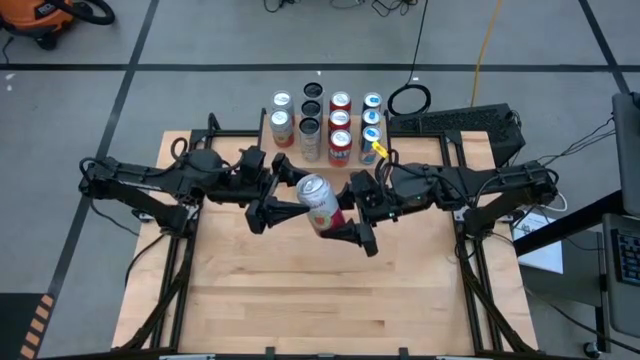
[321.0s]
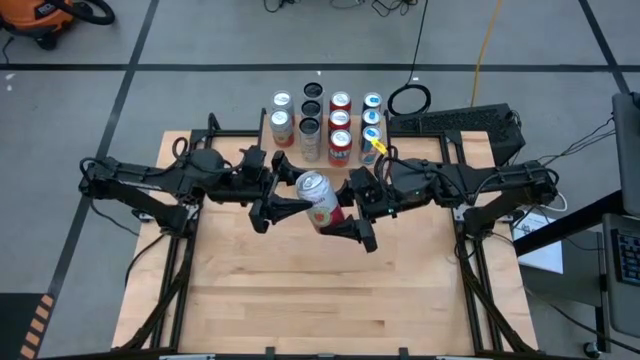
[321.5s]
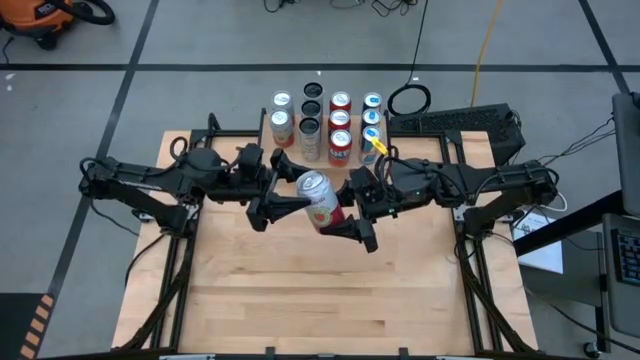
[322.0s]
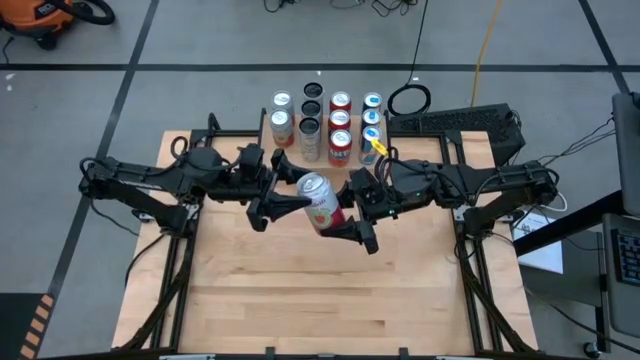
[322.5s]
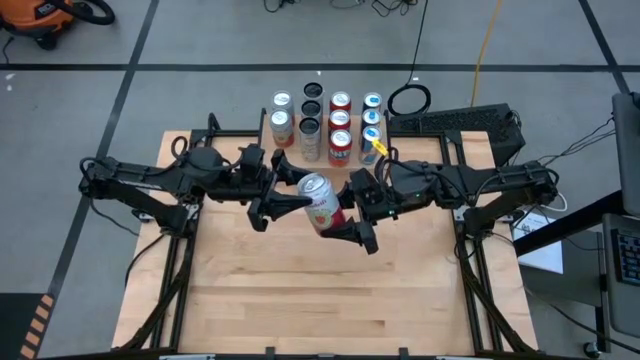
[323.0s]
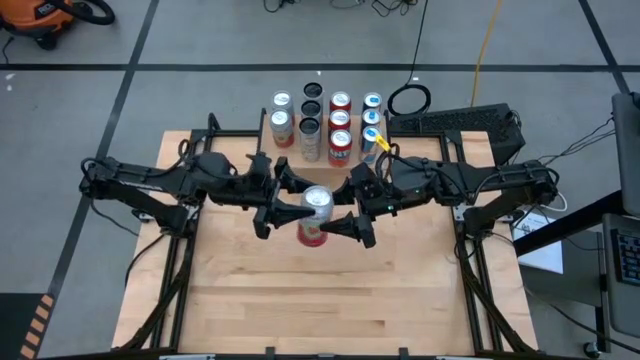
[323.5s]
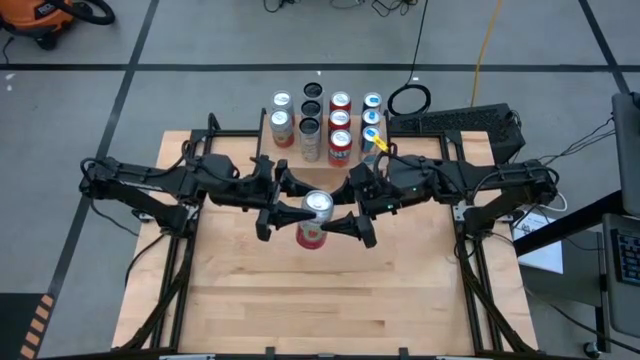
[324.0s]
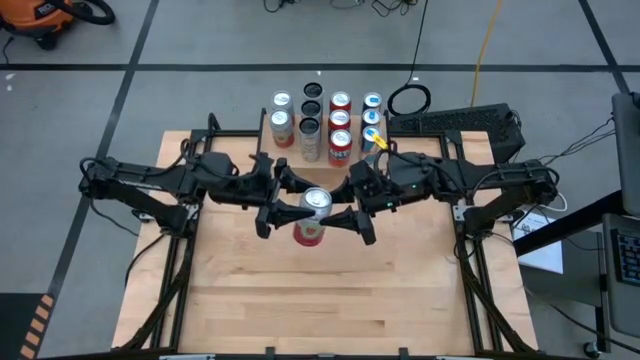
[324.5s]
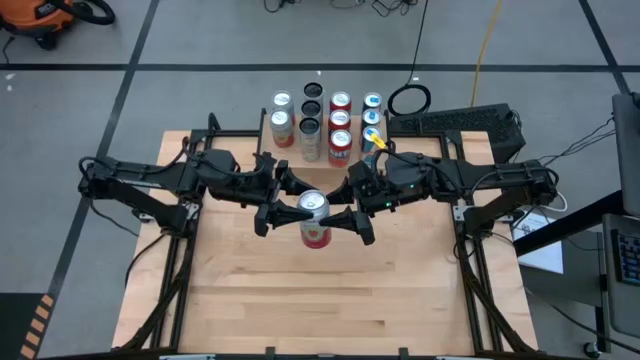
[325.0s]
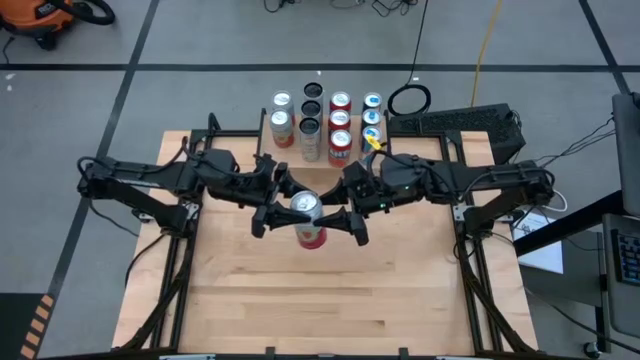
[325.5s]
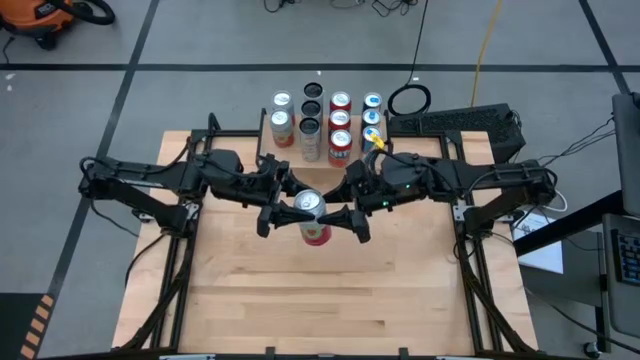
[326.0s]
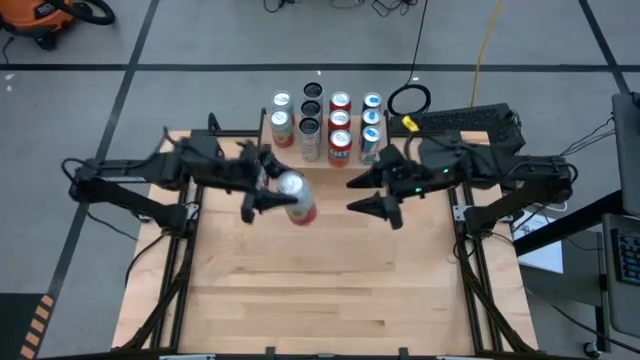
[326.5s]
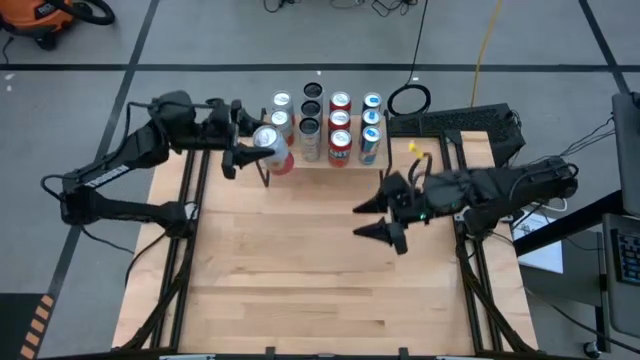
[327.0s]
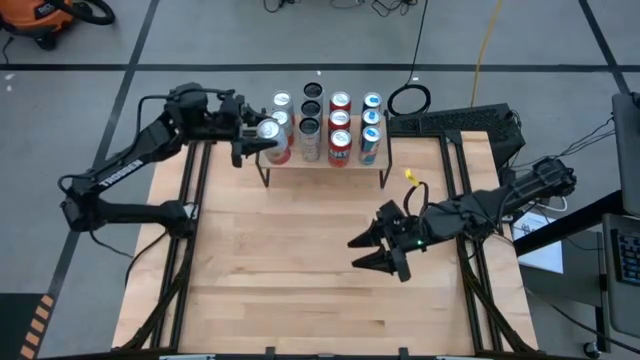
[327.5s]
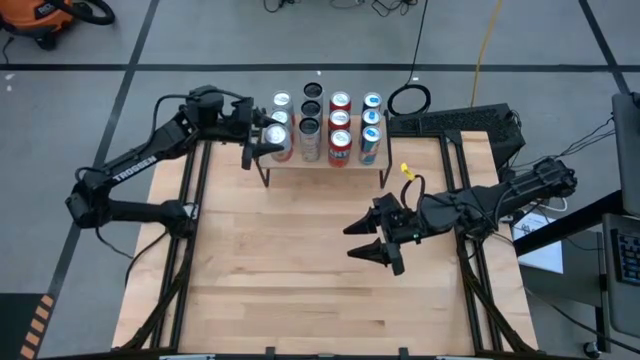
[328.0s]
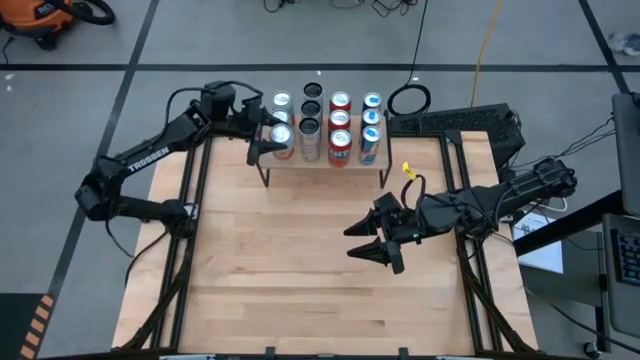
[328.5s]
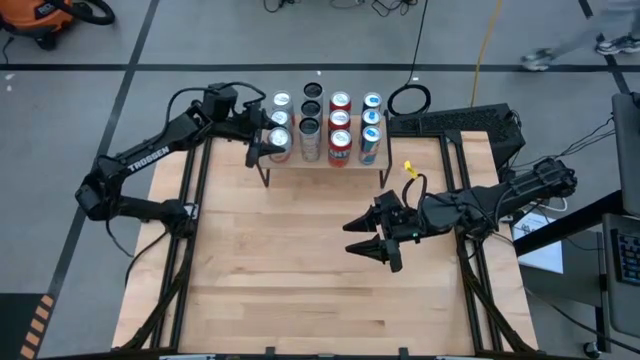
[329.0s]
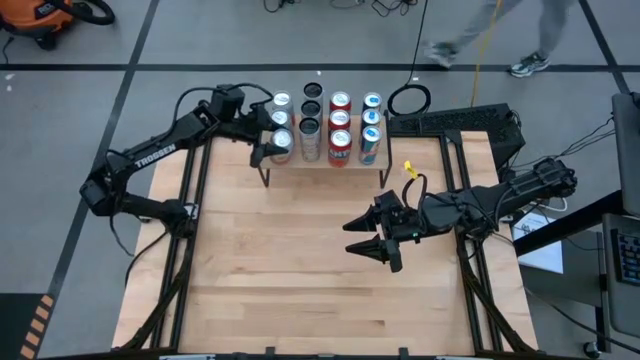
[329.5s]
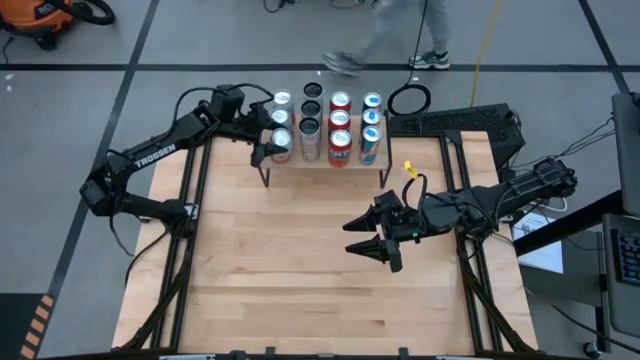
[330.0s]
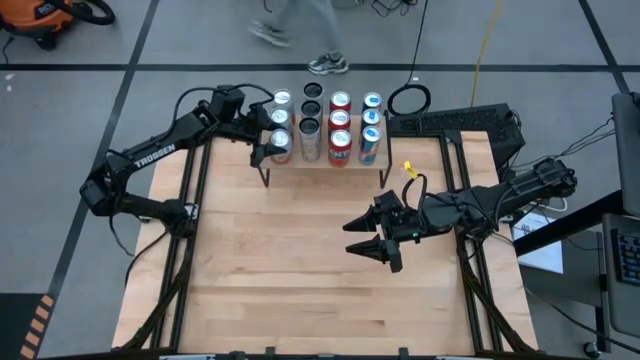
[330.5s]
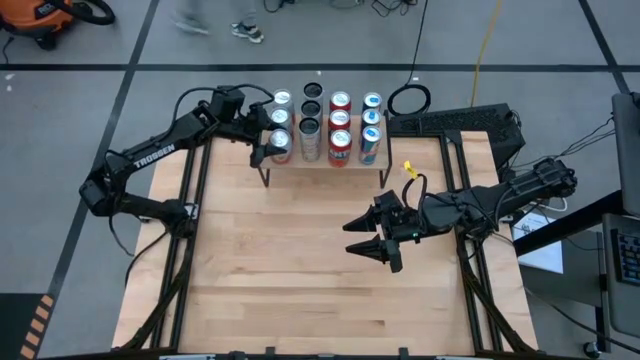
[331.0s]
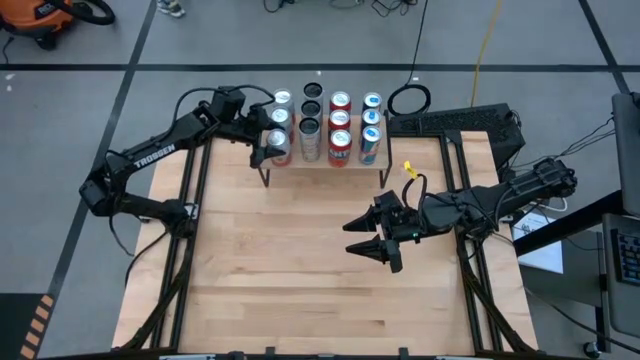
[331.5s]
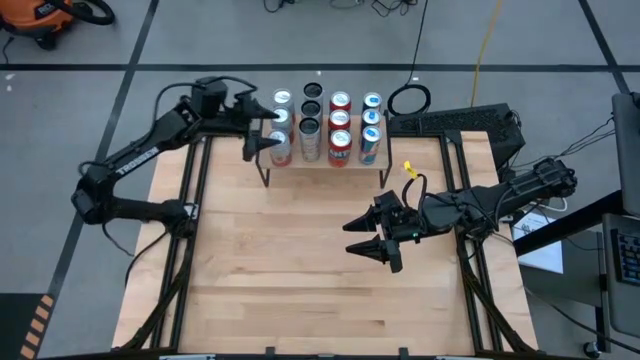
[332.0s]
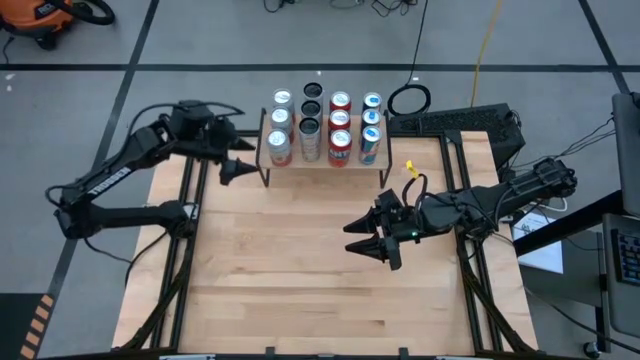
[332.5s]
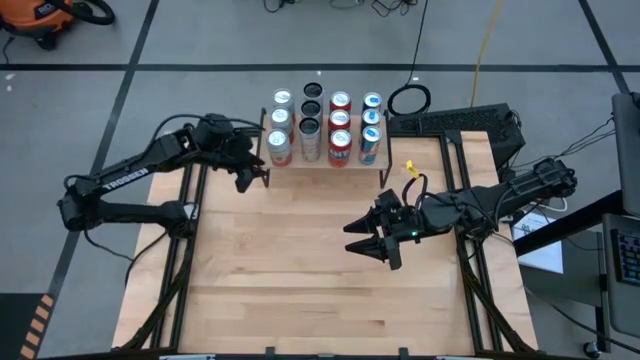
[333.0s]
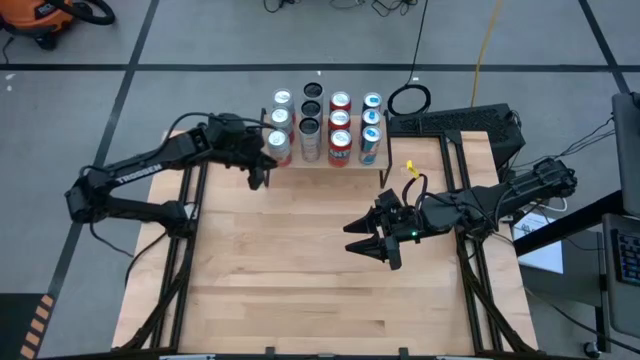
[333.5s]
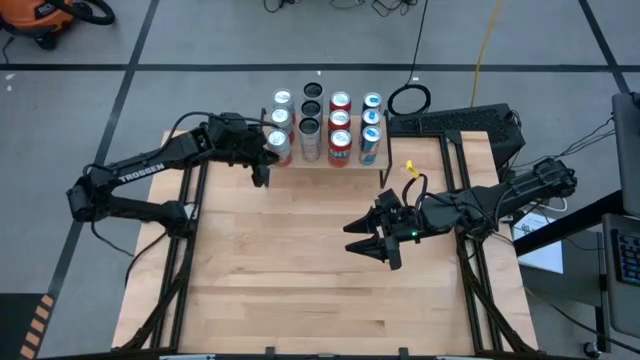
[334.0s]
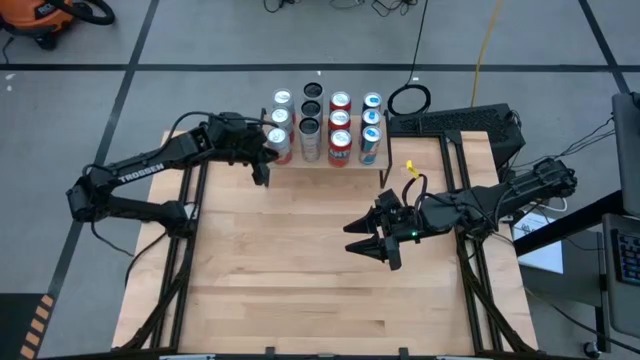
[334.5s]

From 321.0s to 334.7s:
Task: Place canned beverage on shelf
Put the pink and white soda can aligned with the other pink and white soda can on the shelf
